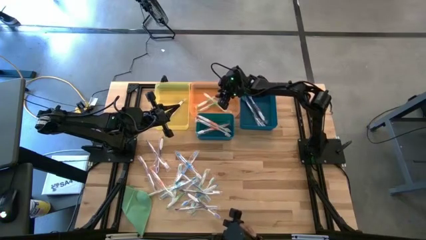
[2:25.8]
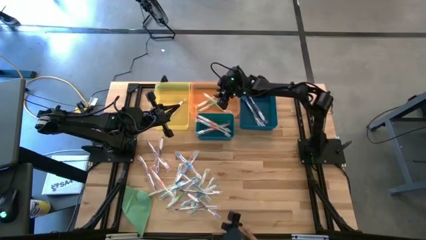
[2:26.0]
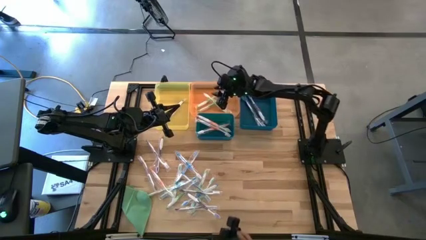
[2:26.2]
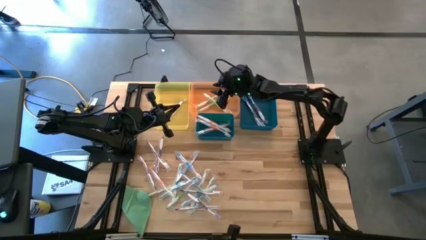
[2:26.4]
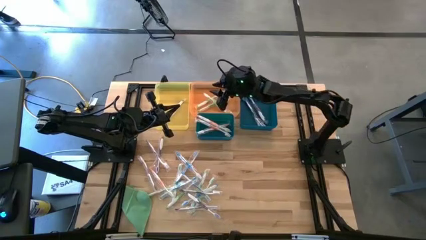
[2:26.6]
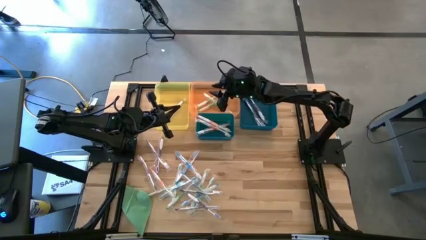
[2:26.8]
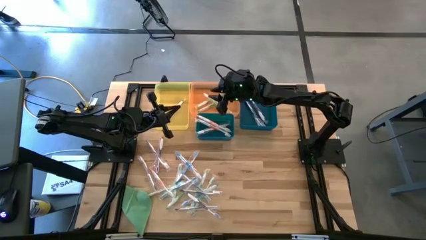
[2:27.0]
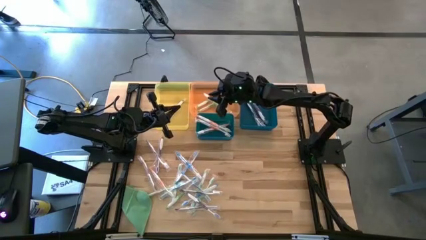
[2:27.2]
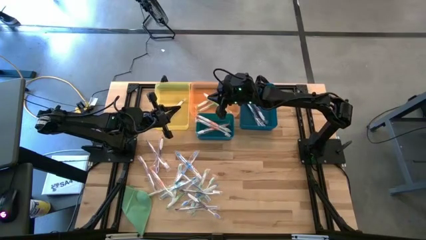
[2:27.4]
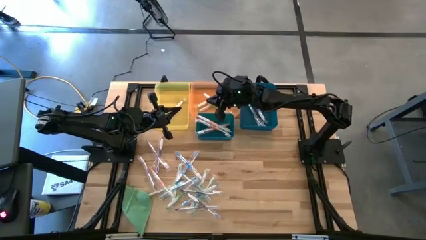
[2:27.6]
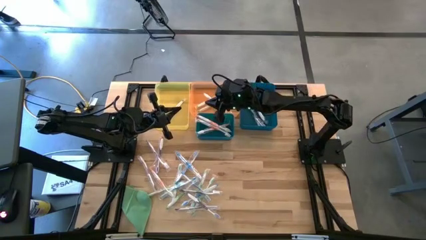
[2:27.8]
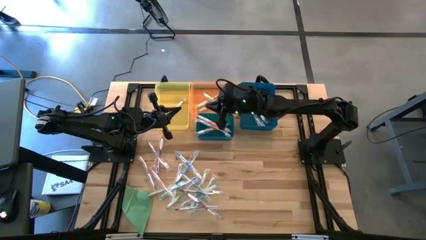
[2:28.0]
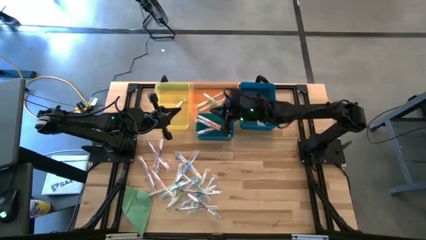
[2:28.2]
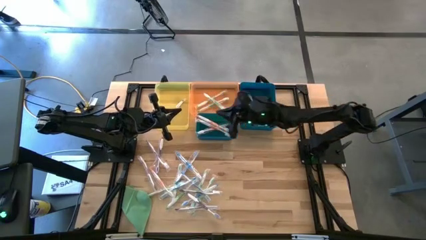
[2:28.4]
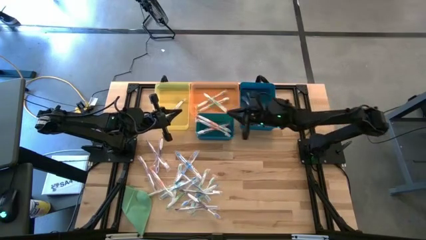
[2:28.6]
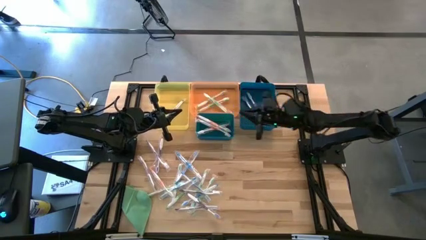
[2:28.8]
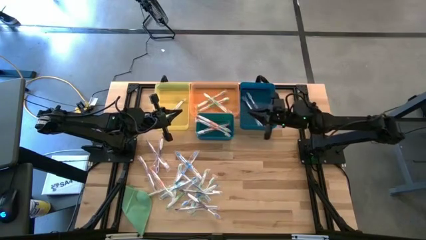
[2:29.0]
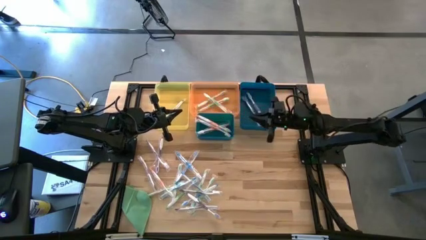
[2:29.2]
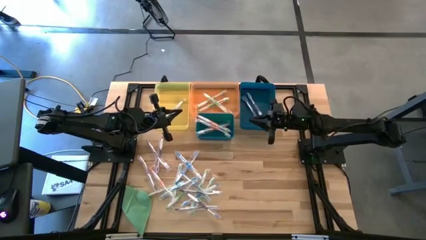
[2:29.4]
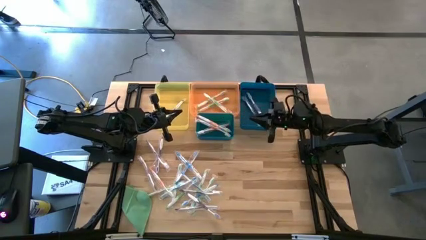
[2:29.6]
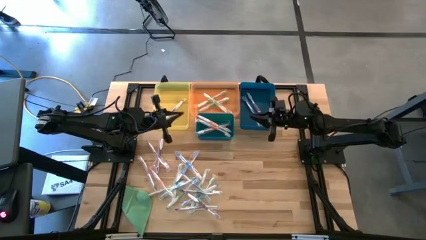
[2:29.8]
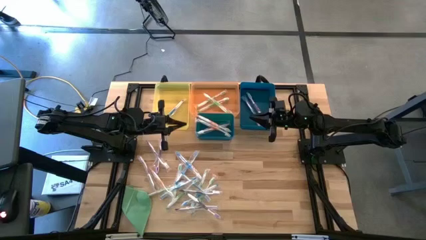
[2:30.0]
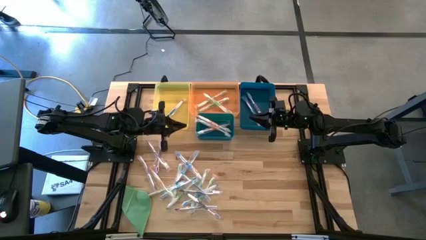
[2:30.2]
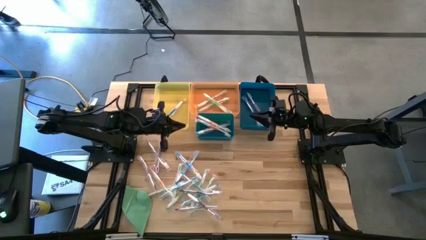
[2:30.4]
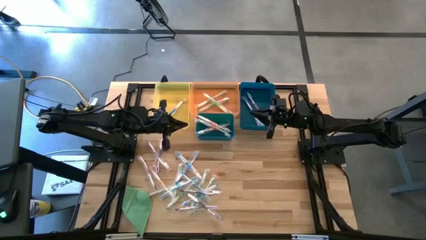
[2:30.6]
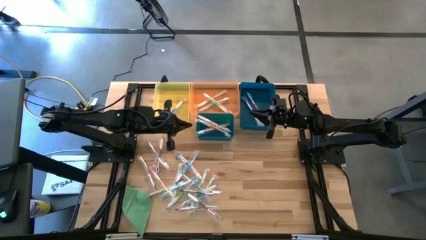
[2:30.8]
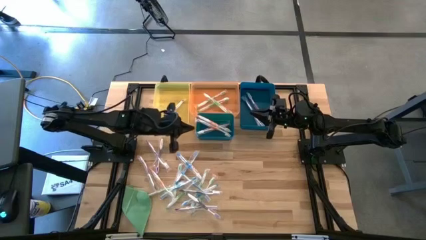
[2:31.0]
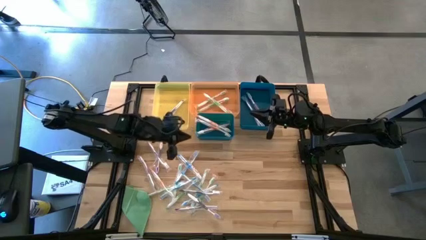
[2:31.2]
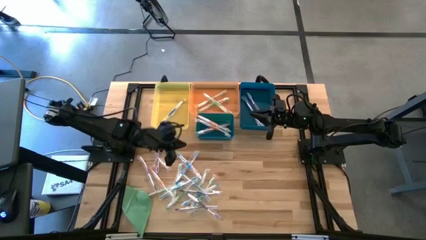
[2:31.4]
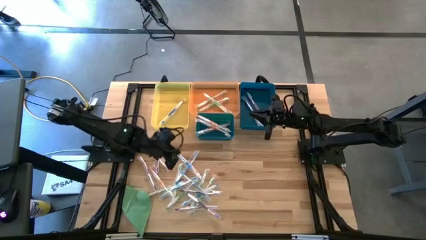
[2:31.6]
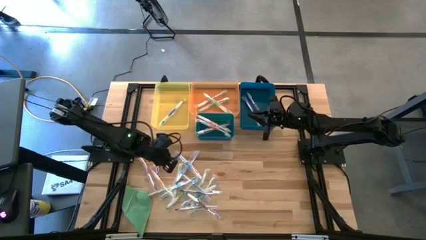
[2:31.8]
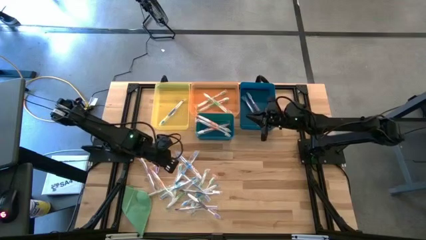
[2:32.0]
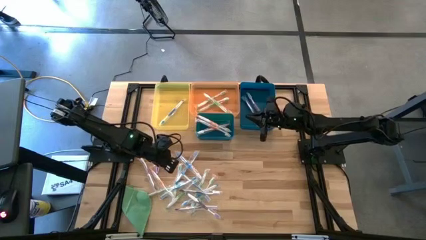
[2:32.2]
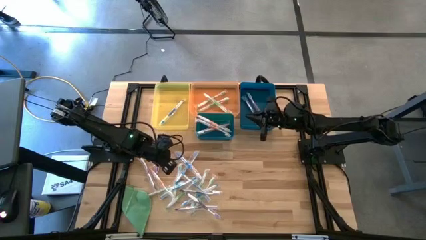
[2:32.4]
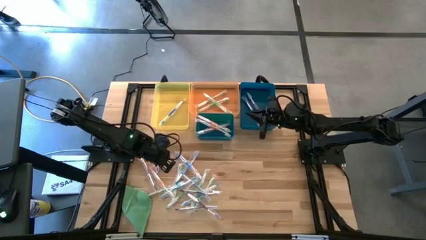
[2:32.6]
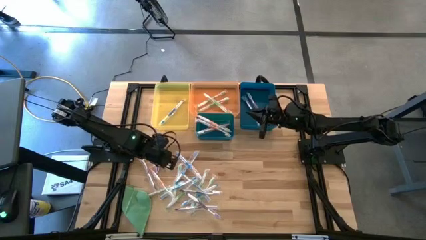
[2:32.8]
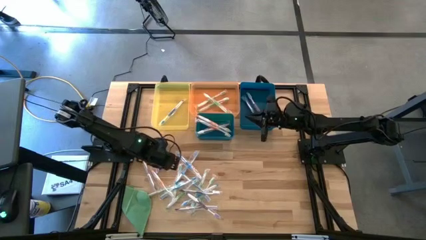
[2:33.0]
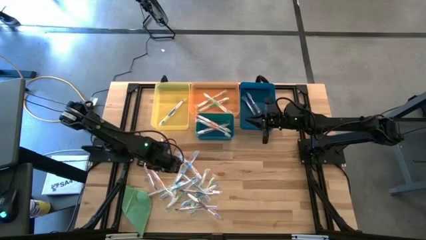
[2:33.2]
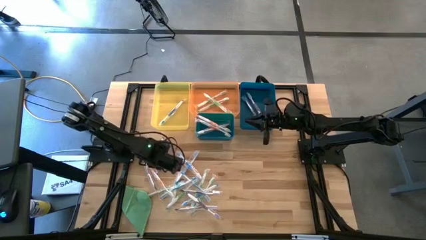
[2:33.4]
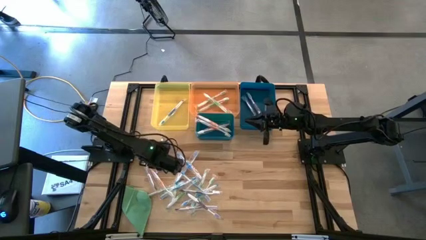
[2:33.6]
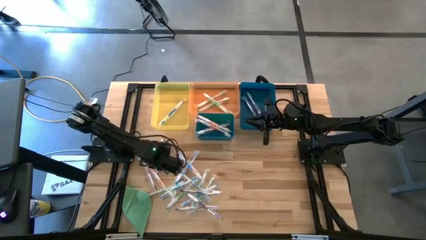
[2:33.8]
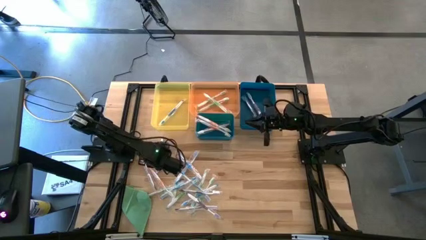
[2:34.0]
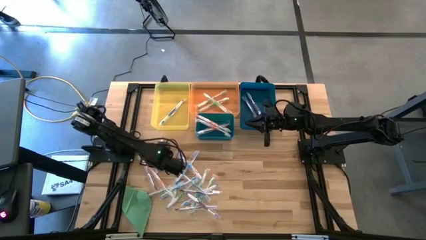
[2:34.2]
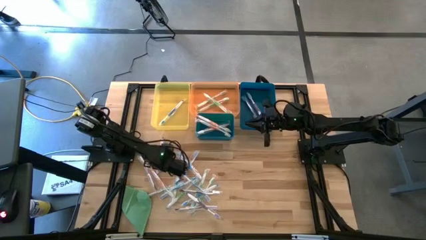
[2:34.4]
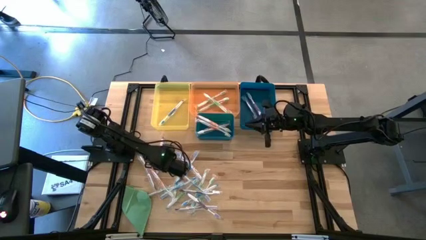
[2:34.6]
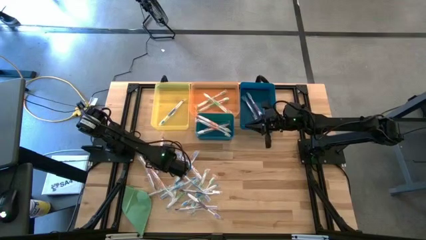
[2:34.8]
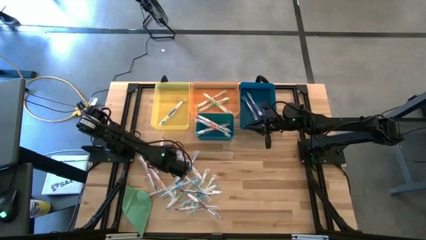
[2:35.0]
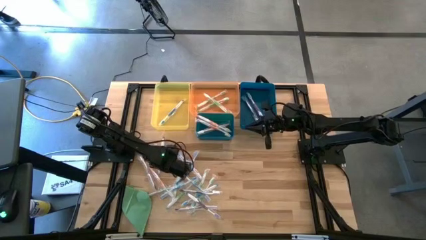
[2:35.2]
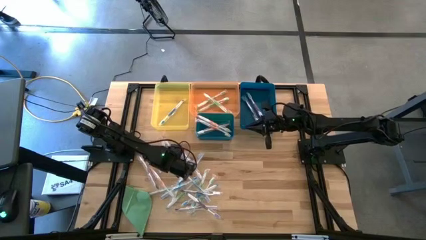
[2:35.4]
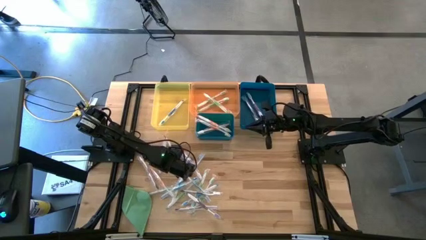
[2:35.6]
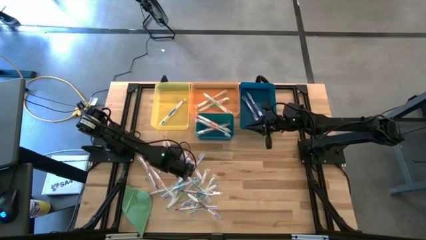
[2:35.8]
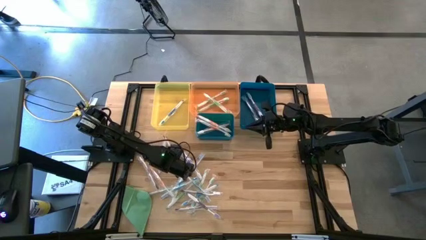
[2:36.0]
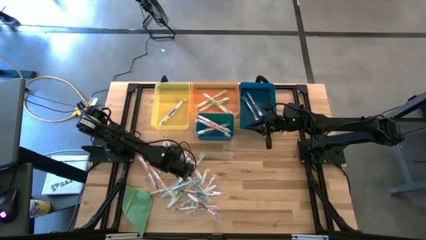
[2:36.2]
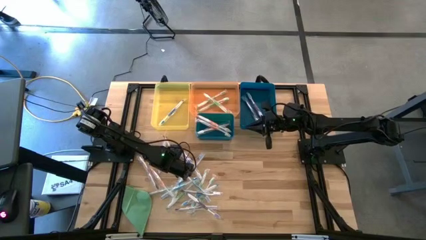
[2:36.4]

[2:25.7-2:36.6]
Task: Pick & Place Toothbrushes
Put the purple toothbrush into the blue bin
